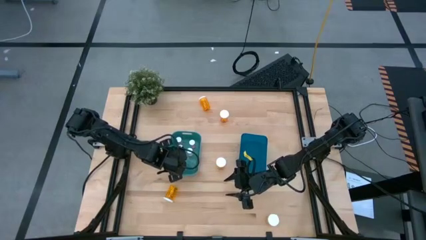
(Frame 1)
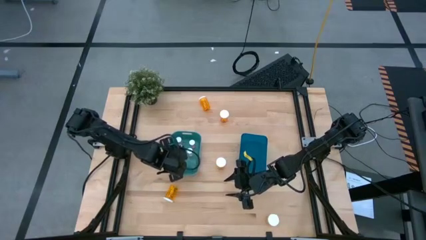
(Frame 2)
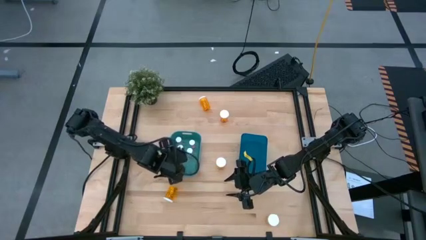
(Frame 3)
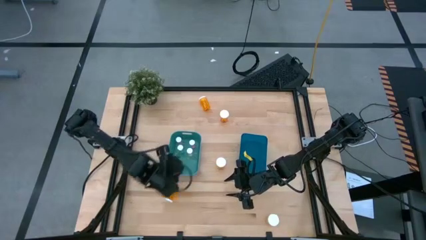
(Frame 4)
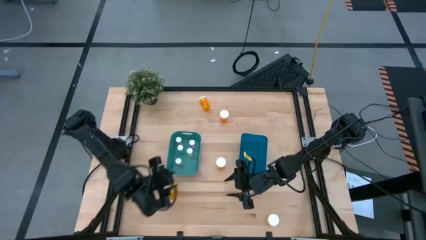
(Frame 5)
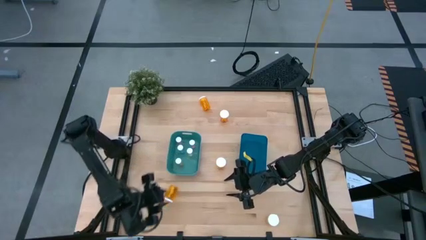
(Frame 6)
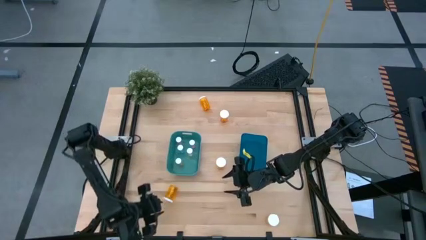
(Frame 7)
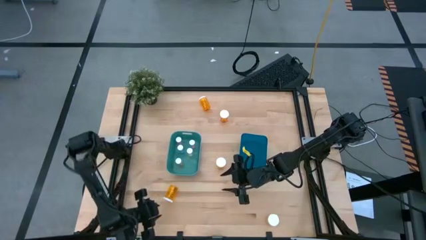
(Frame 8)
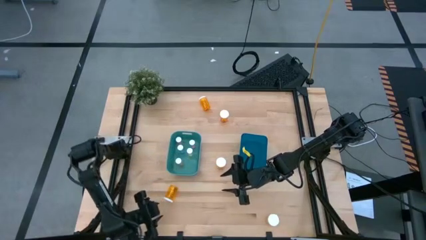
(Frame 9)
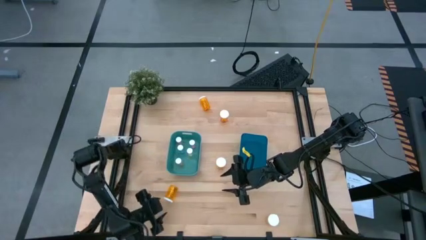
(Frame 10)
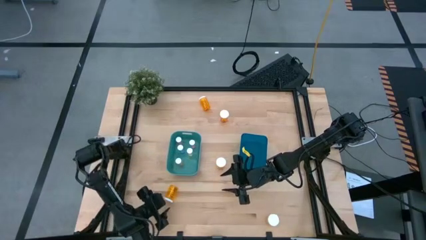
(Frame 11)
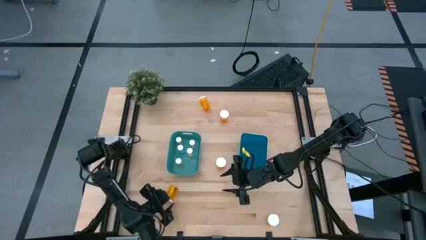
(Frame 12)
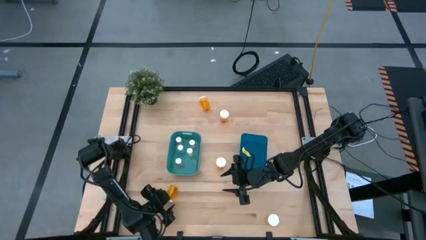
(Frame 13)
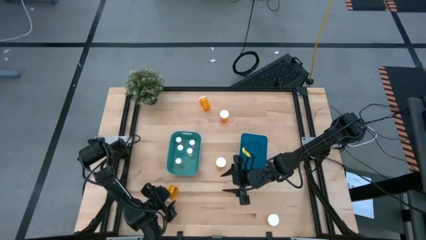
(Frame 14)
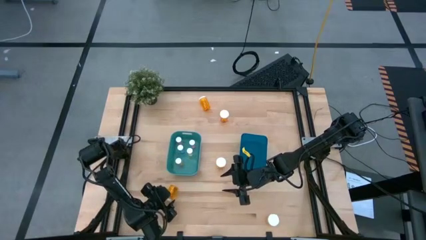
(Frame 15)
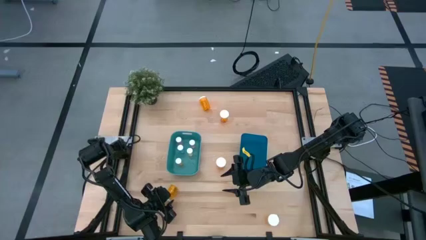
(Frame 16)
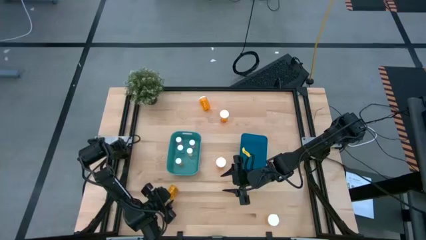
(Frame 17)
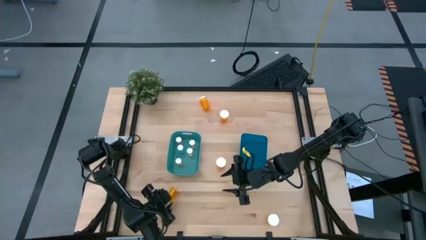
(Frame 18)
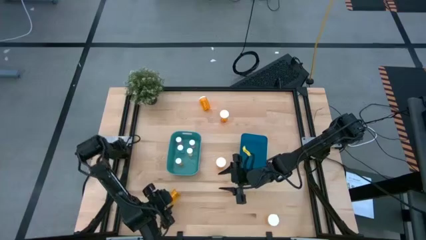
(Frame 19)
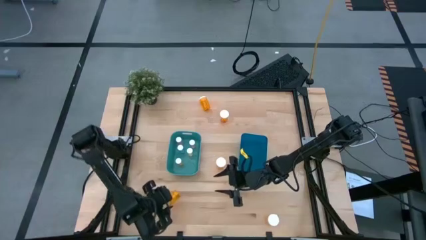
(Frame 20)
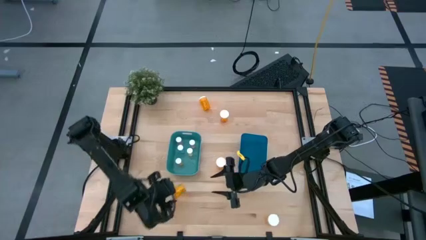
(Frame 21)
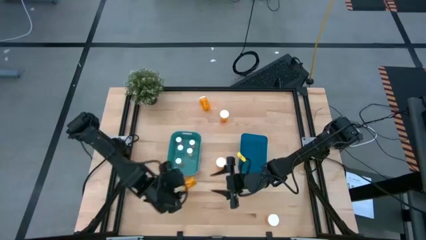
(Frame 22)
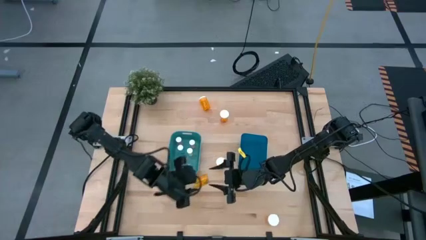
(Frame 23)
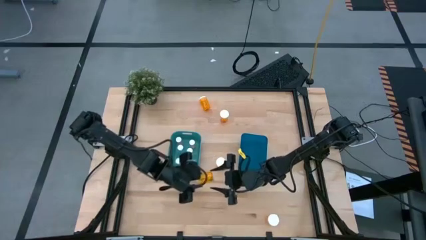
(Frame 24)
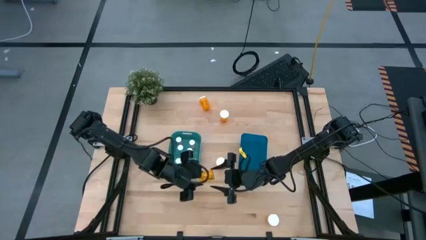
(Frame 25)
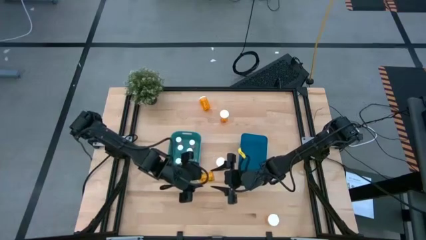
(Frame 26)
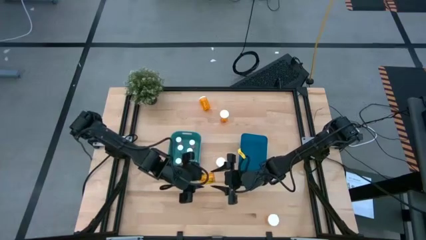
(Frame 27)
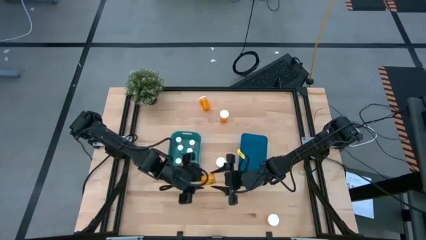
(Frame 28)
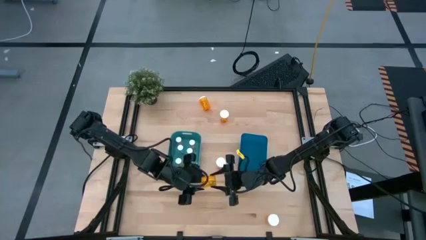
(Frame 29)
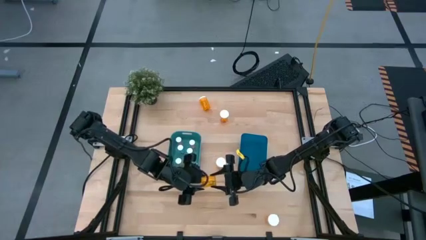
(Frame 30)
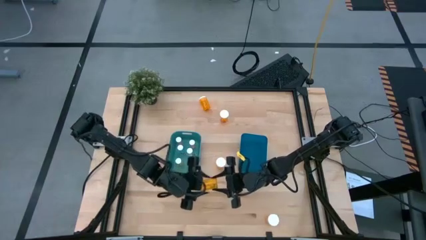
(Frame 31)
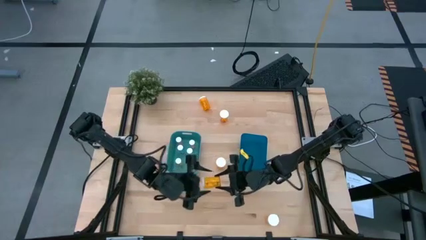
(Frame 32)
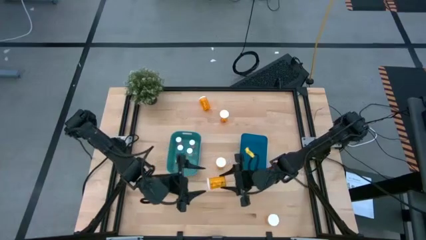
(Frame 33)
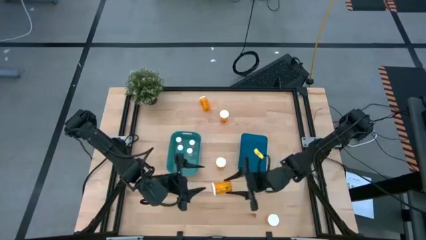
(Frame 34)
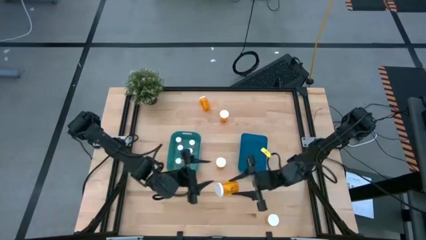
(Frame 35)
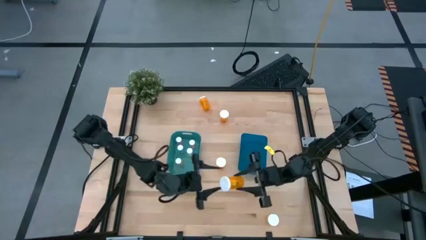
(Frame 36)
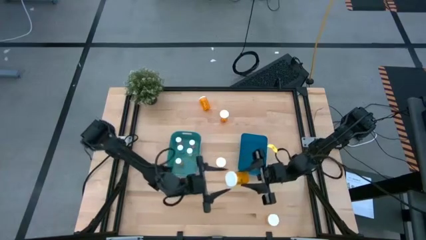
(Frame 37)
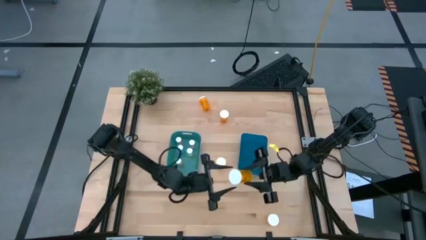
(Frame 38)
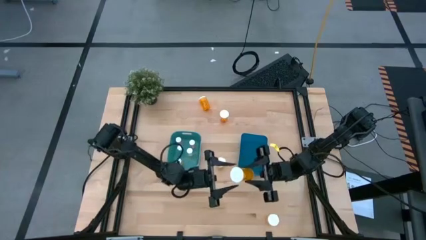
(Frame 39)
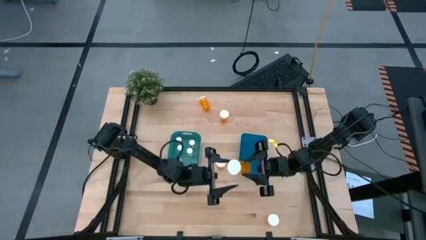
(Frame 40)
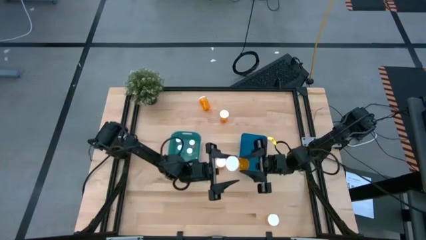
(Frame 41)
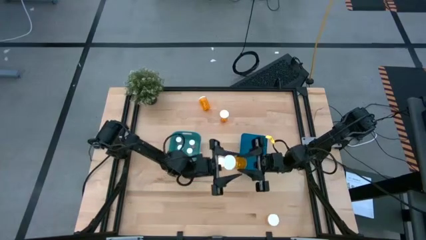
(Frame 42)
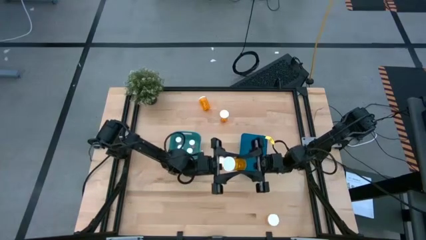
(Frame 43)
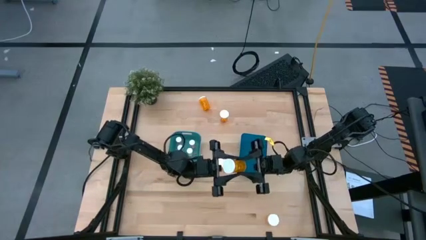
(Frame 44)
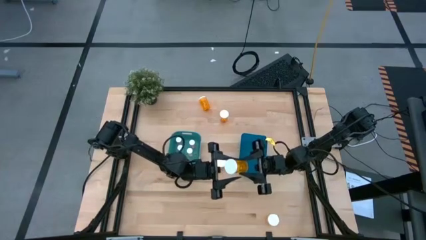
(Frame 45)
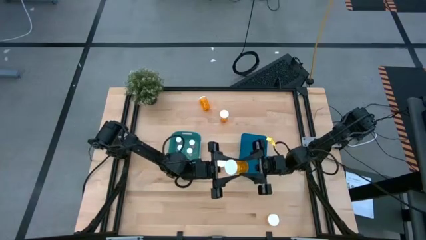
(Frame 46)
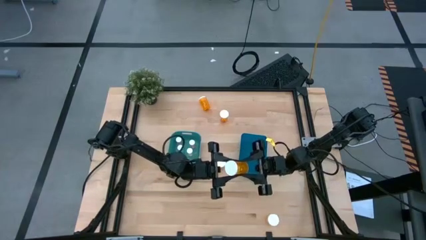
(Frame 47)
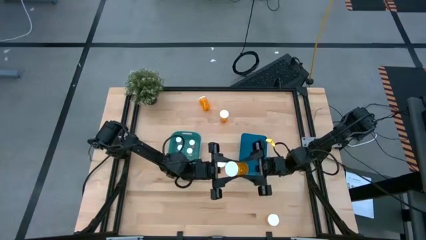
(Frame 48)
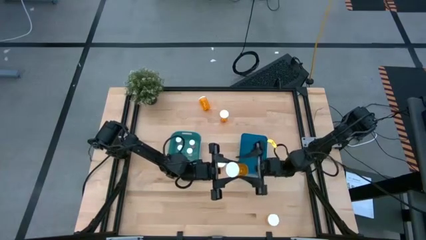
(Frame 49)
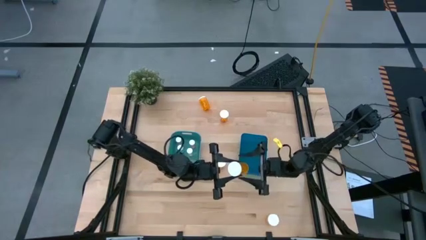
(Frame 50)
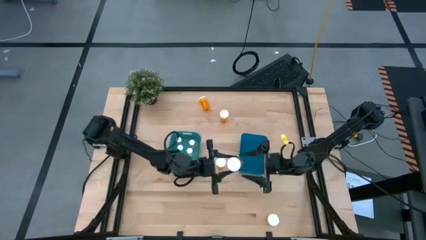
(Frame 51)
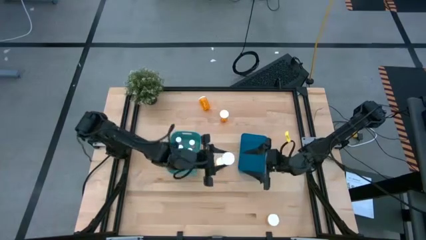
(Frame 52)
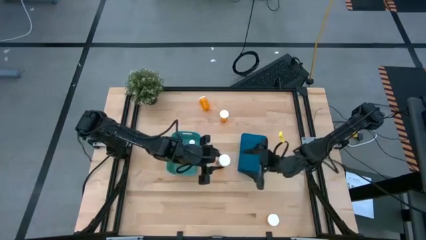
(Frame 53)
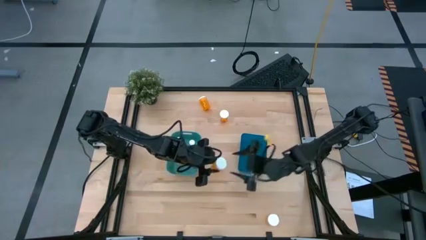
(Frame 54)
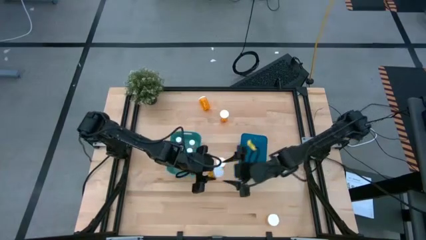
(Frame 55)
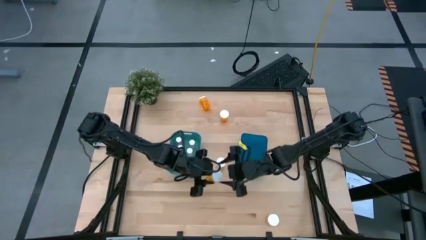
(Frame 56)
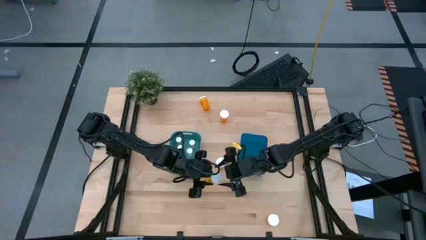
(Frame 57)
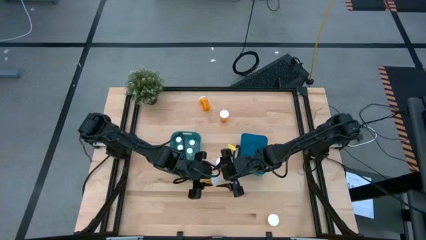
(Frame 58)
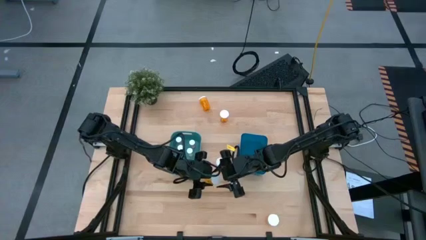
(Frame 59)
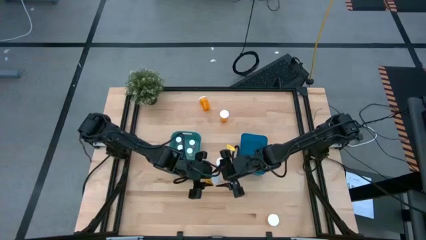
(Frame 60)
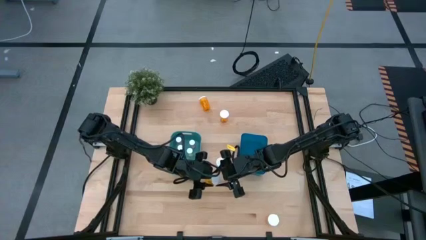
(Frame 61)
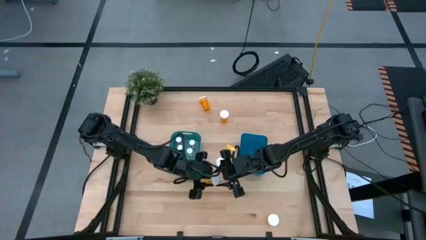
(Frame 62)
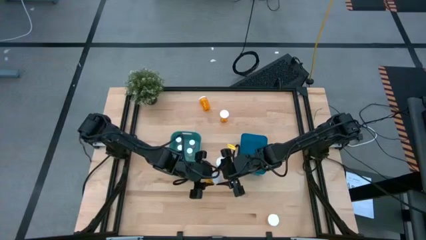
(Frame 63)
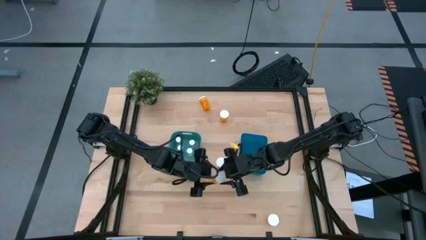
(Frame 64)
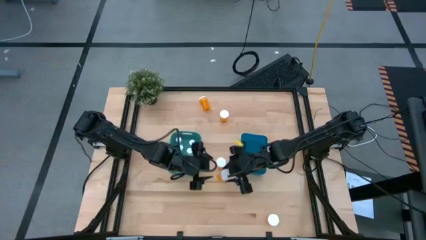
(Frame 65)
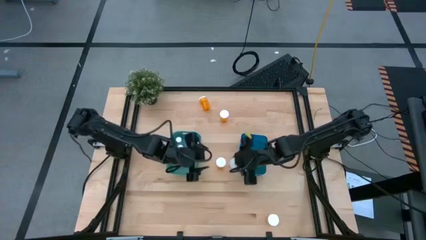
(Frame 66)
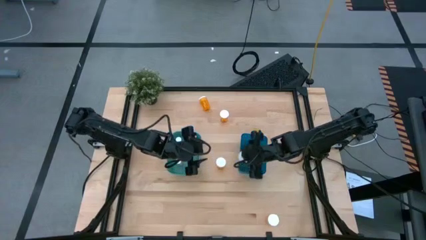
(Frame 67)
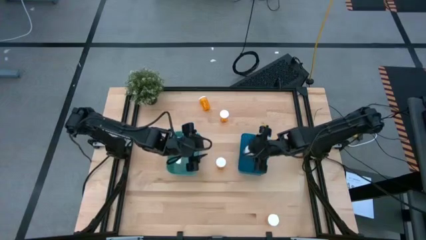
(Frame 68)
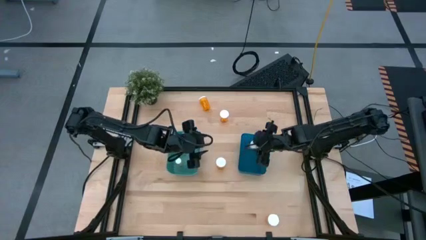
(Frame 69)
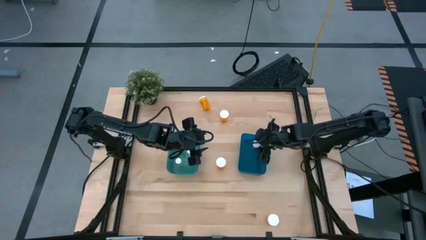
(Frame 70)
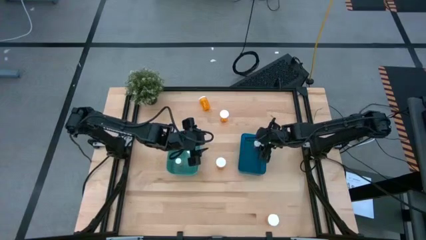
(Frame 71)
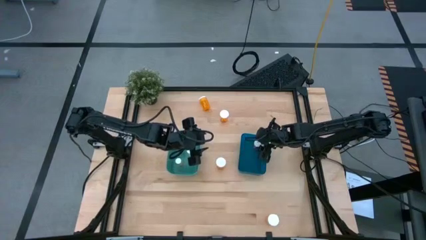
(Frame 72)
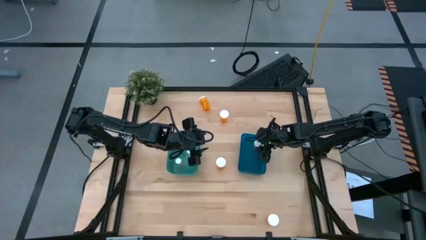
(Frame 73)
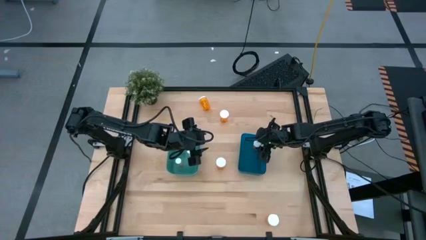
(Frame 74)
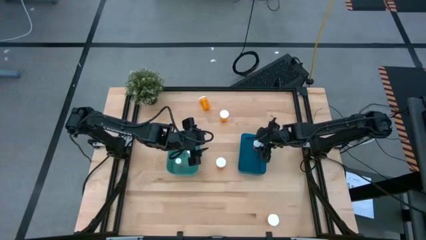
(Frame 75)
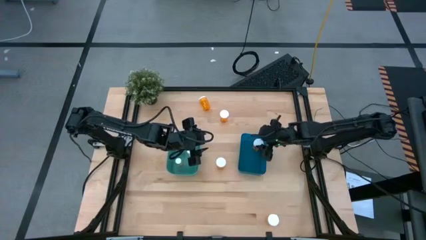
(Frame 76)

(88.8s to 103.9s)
Task: Pick and place medicine bottles into bin by pill shape (circle, oval)
Put the large orange pill bottle into the blue bin

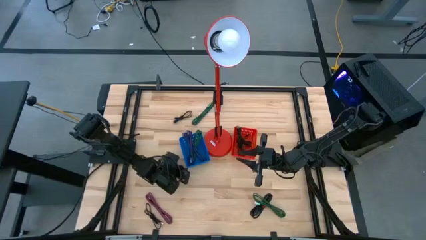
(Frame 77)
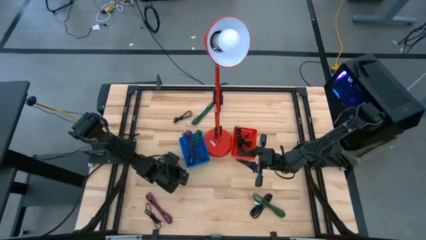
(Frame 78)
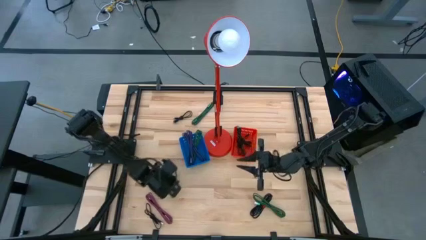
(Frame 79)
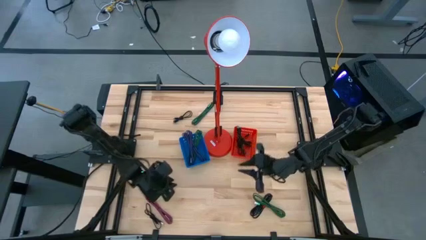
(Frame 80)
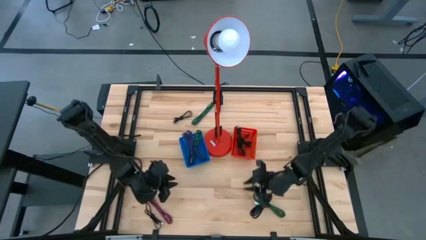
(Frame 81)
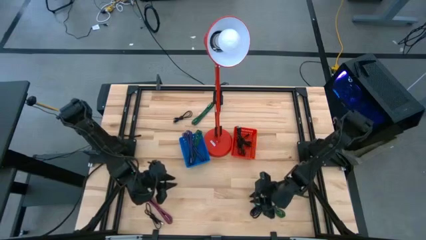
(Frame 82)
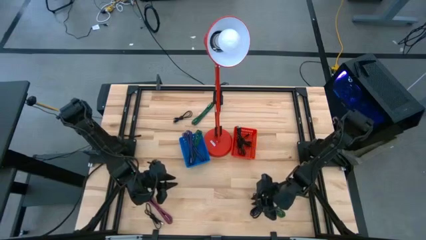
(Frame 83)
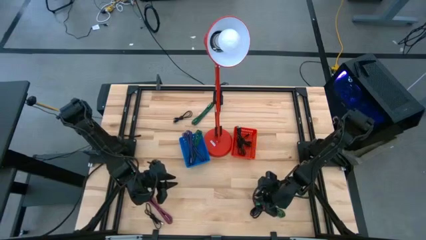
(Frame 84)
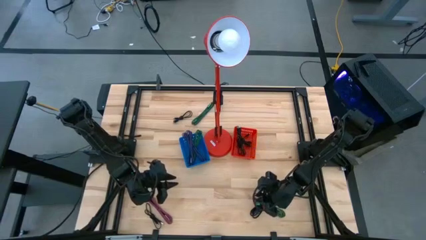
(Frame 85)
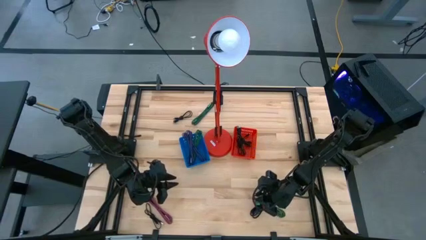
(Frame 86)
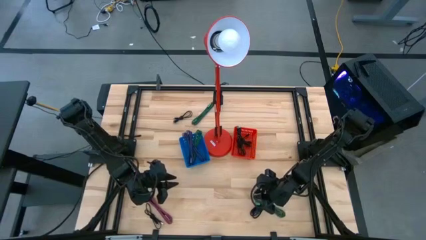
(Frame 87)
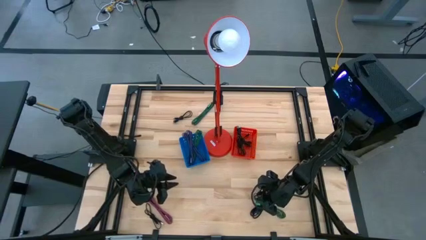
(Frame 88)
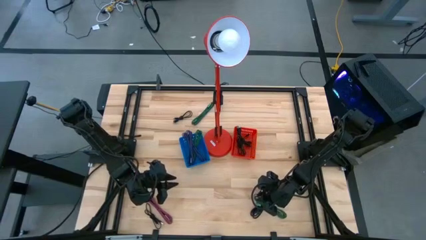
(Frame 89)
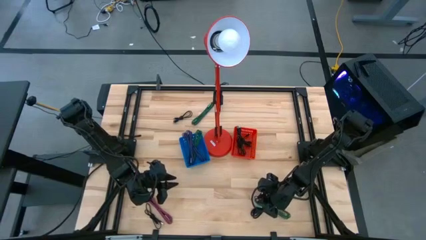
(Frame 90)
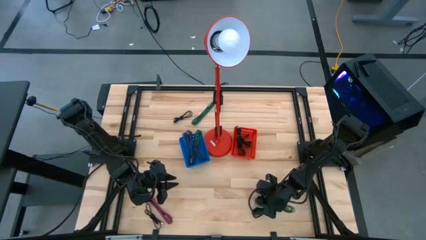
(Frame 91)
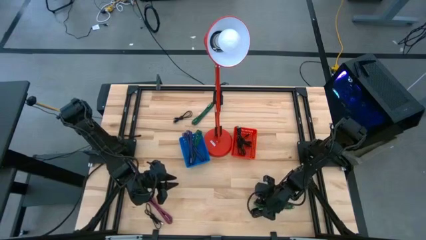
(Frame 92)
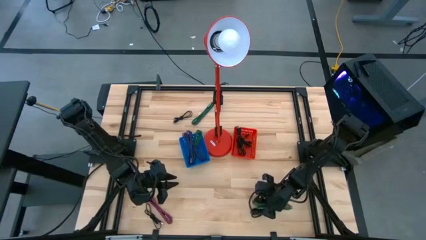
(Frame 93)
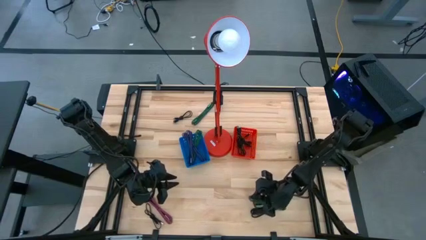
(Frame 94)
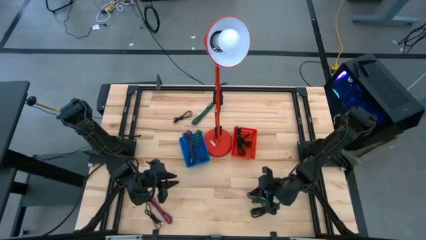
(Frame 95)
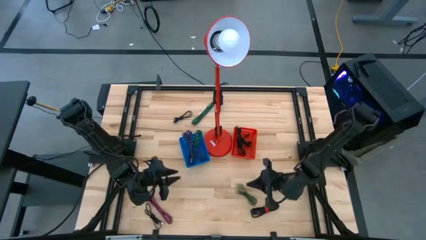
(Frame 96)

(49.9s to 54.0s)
Task: Pick & Place USB Port
Put the green charger cable into the blue bin
